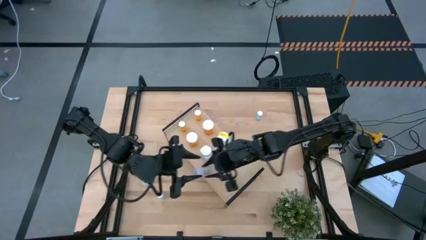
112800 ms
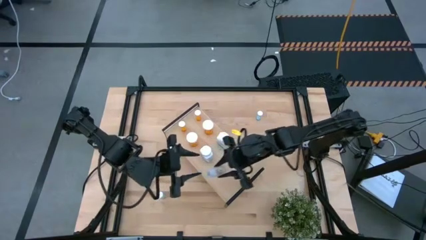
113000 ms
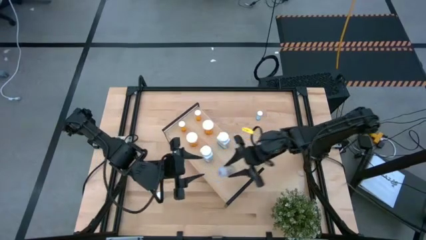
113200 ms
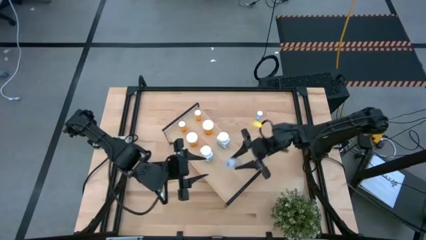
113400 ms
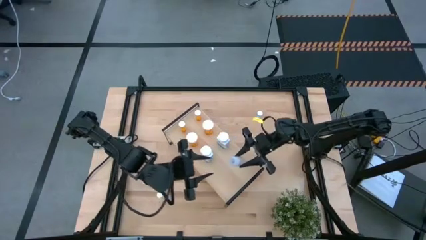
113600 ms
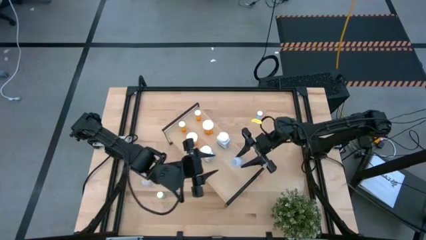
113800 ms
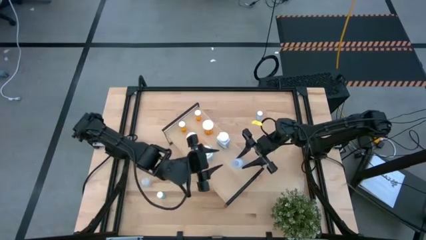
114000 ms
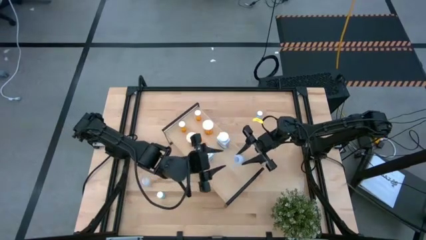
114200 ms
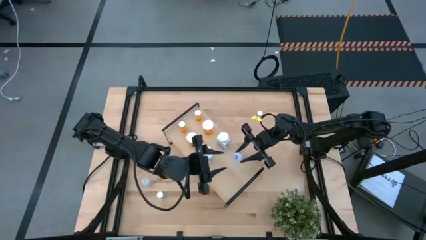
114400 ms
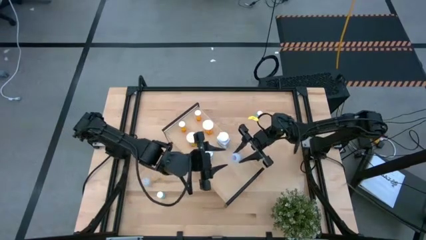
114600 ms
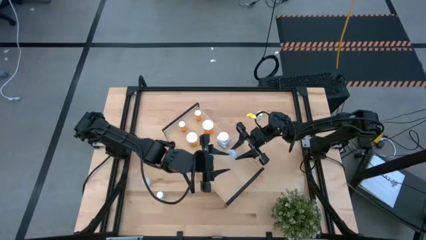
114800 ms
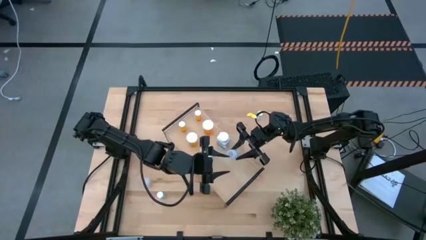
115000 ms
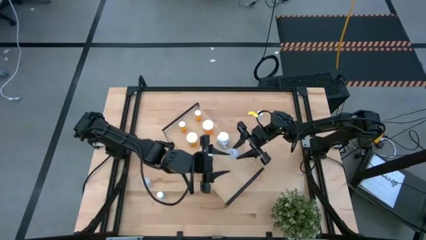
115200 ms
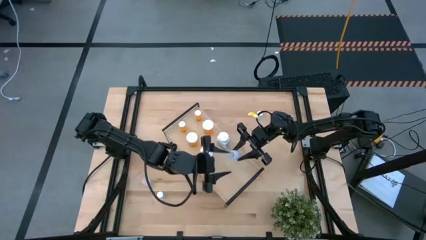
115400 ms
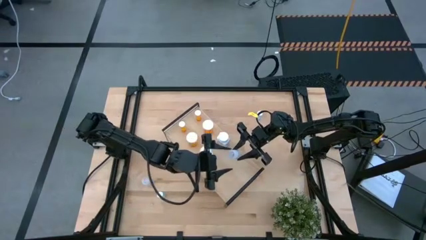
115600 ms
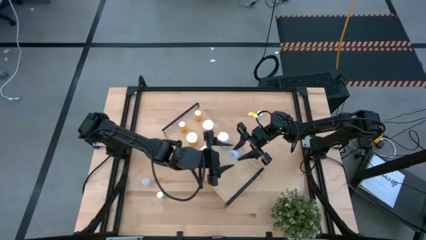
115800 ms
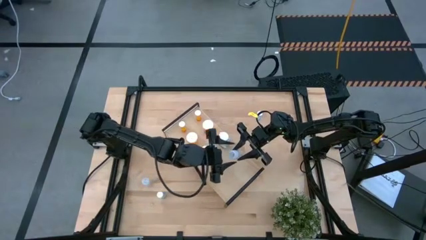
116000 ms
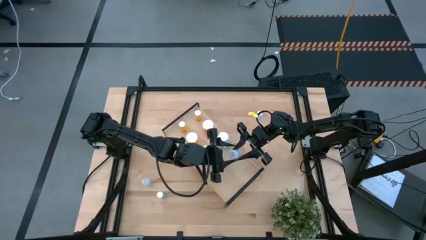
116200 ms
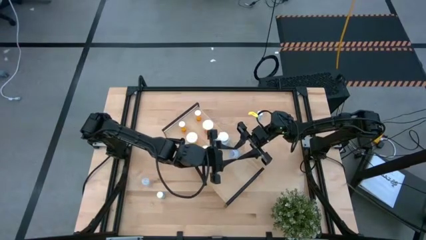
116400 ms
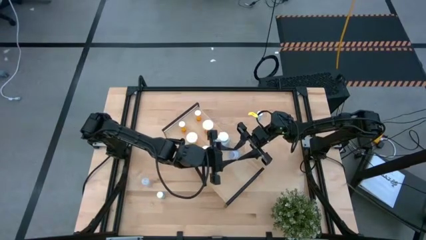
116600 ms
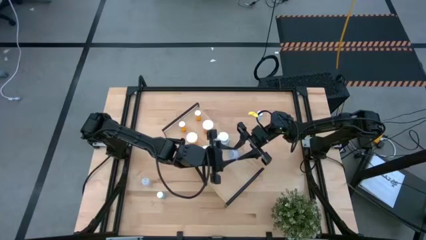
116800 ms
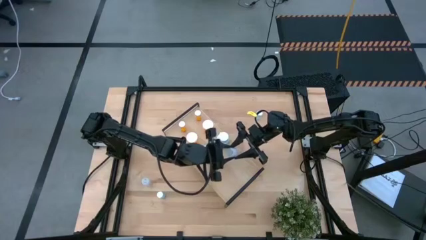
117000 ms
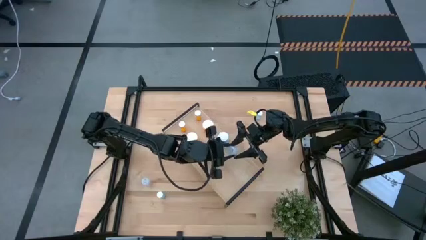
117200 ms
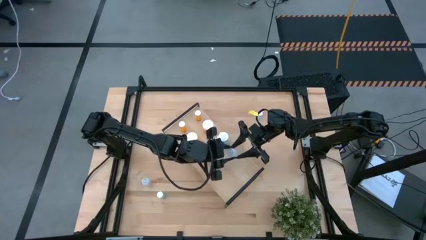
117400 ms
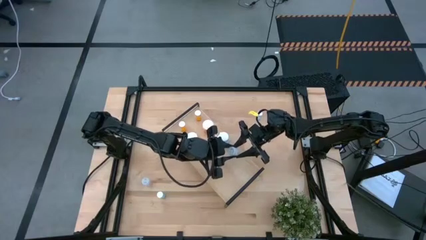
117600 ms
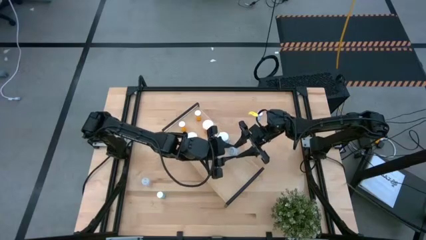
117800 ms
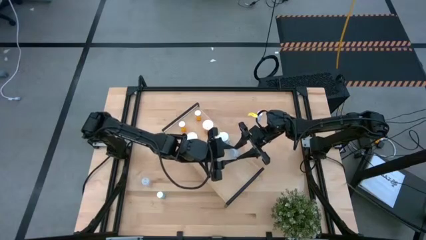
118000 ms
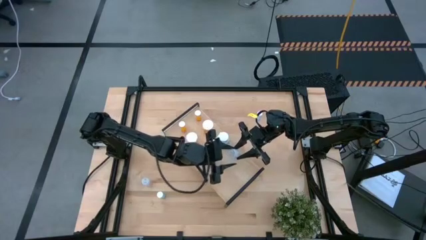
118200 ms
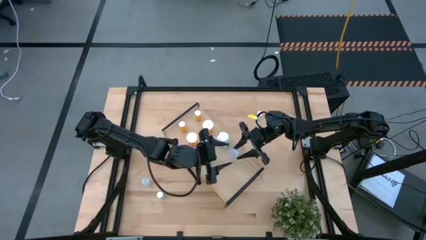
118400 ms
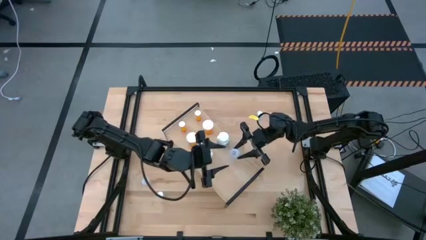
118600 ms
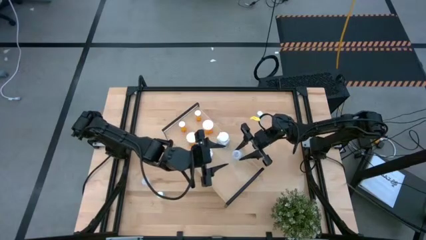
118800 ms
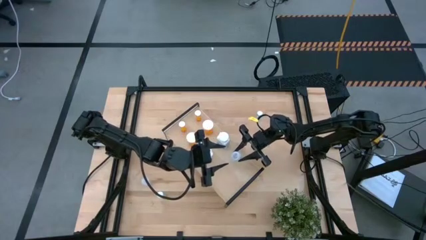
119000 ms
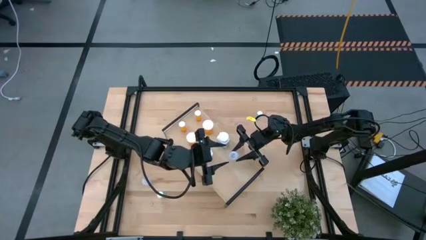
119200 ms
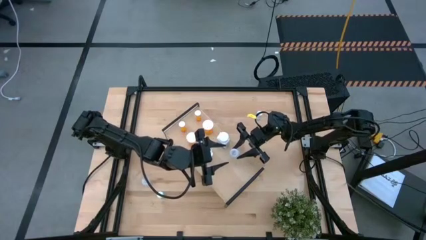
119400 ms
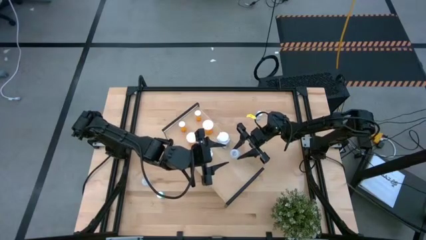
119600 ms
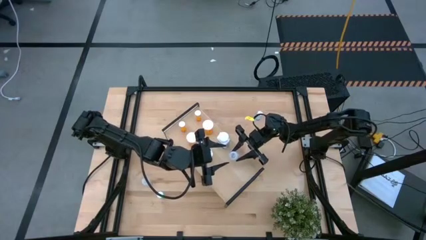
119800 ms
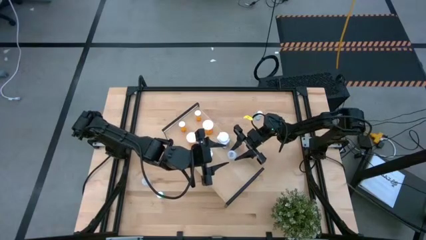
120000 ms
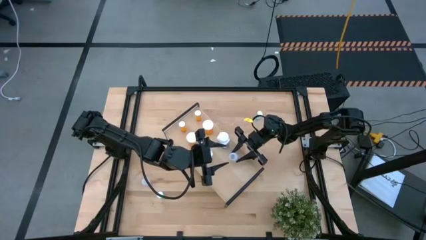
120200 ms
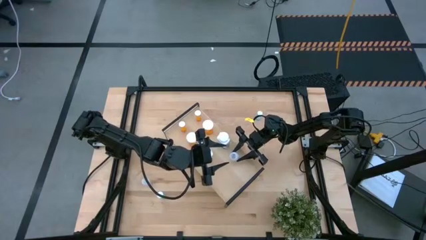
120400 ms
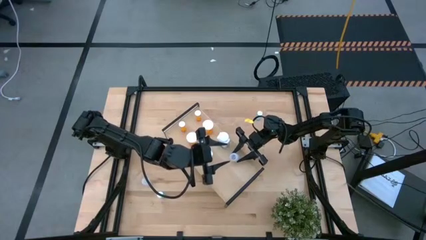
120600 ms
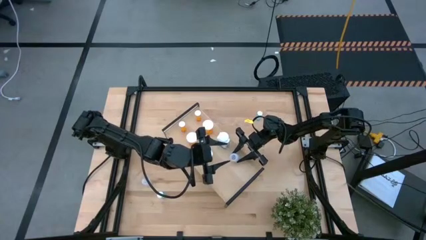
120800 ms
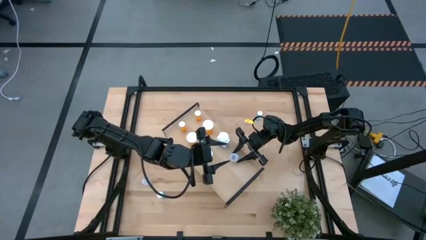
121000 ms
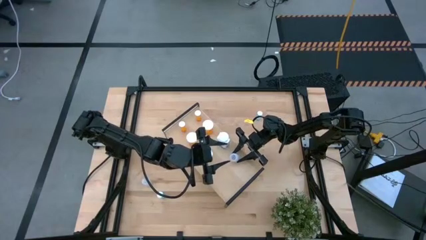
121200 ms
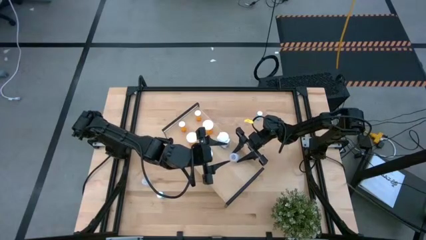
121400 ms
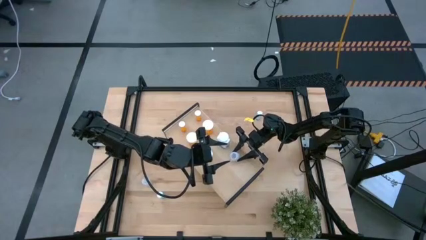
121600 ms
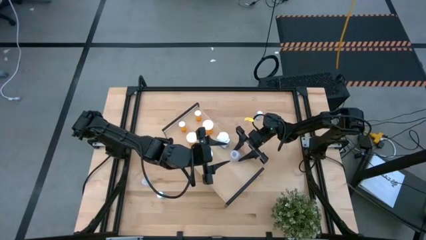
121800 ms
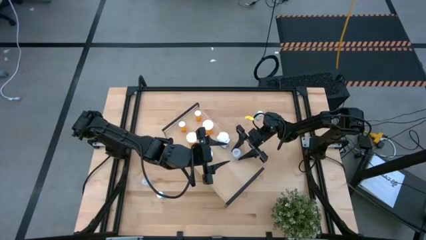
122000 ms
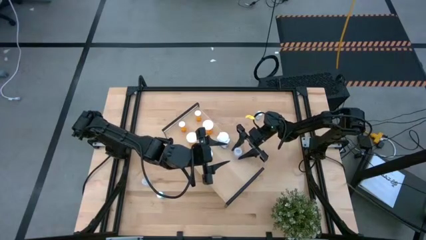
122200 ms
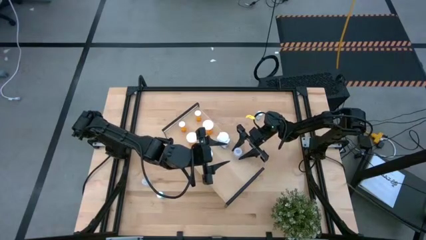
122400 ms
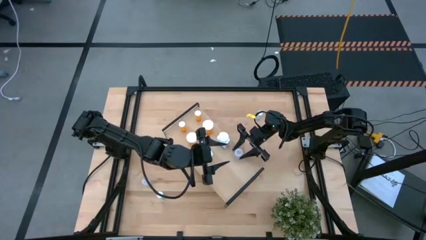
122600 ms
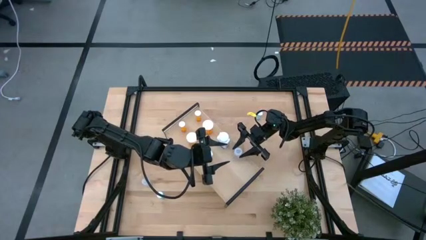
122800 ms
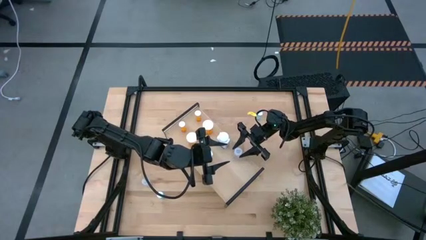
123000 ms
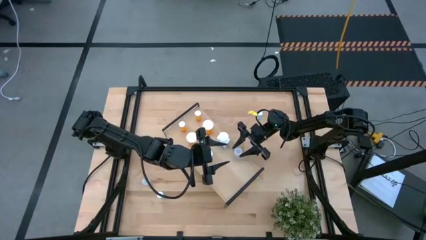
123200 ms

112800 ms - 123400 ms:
Task: Pick and place medicine bottles onto shelf by color
Put the top transparent pill bottle on the shelf

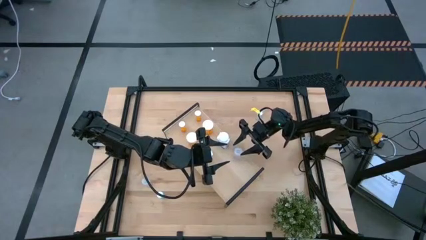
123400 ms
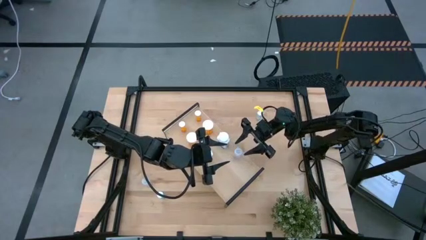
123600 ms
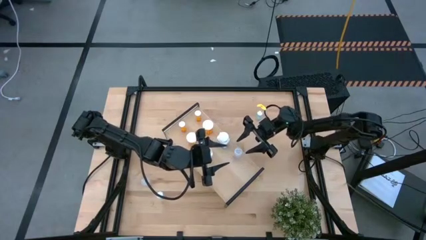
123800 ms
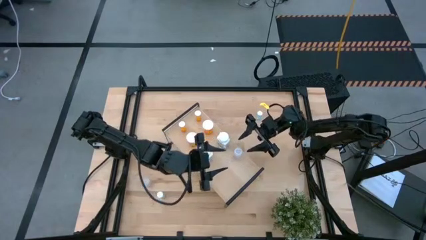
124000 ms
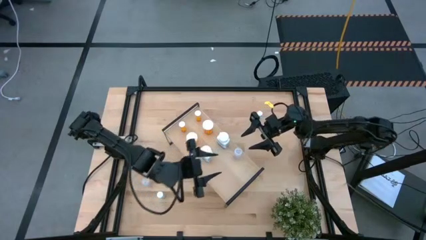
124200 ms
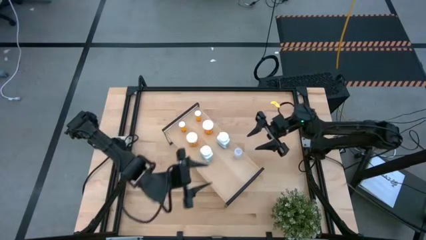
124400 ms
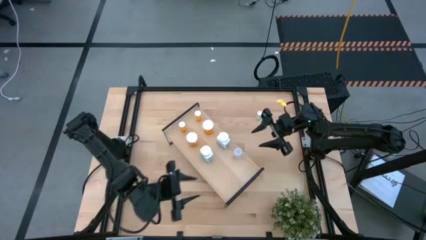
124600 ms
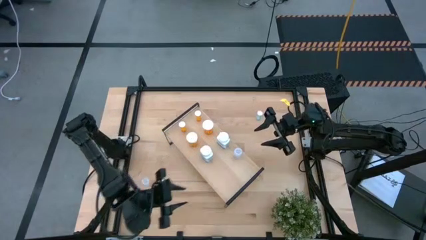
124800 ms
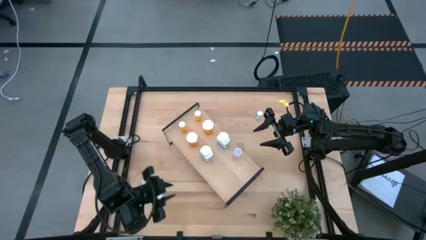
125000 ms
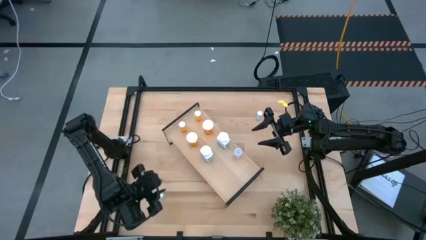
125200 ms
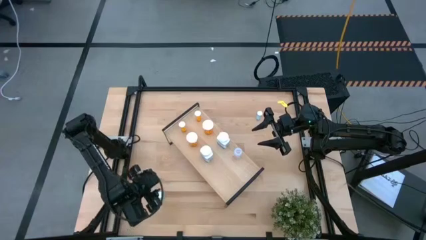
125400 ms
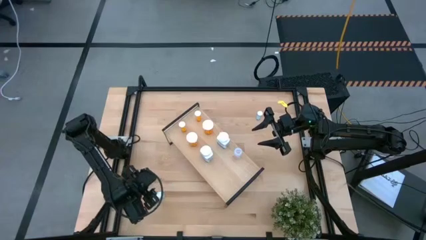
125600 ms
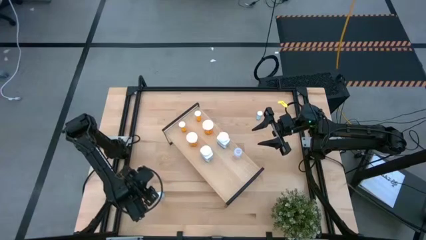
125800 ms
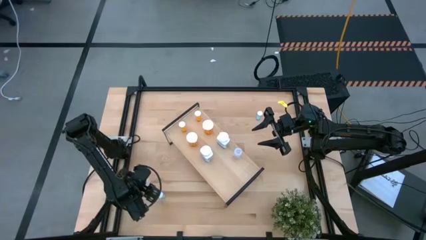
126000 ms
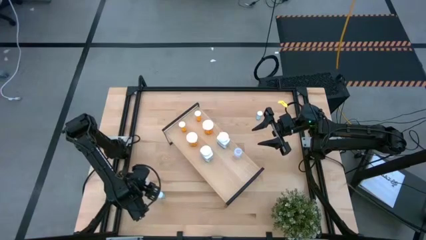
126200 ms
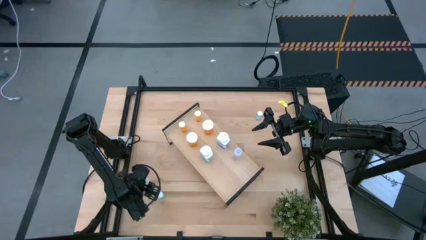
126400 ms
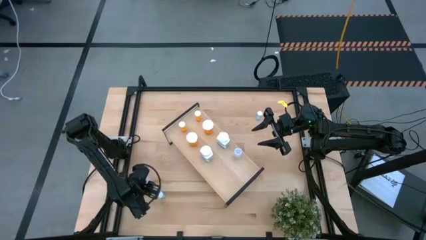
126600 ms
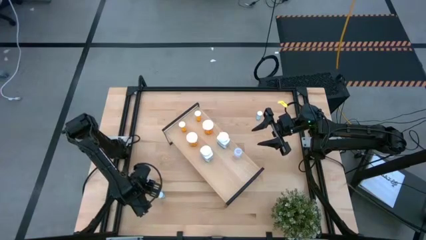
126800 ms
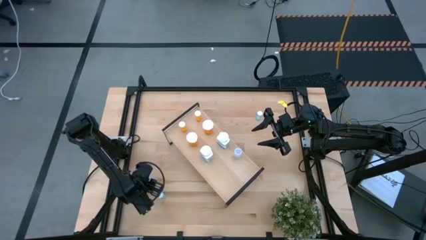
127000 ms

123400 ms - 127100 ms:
Put the transparent pill bottle on the shelf aligned with the transparent pill bottle
